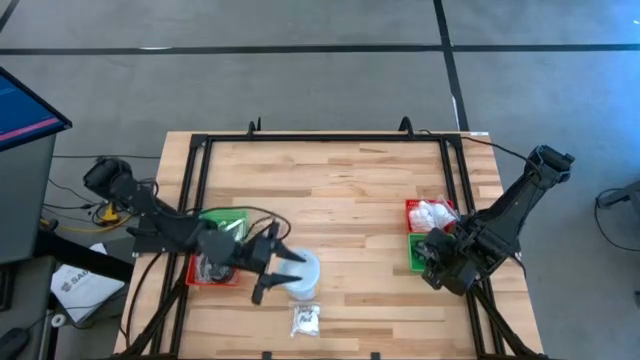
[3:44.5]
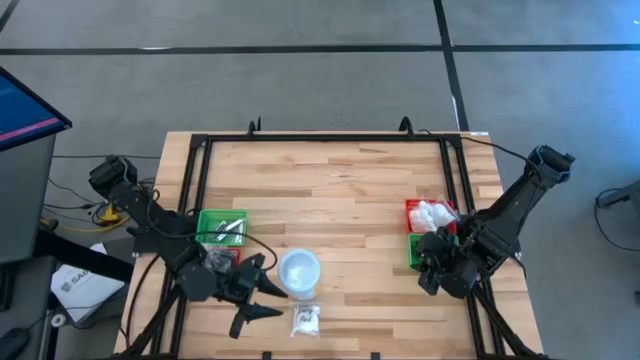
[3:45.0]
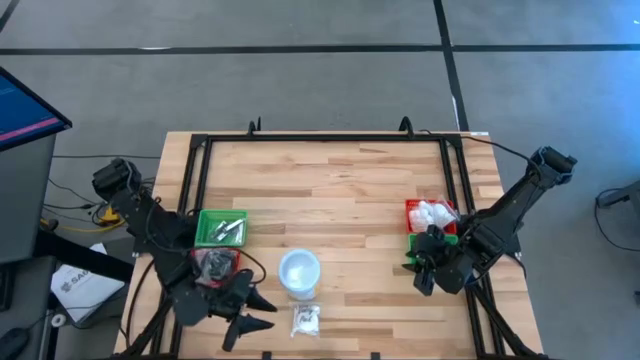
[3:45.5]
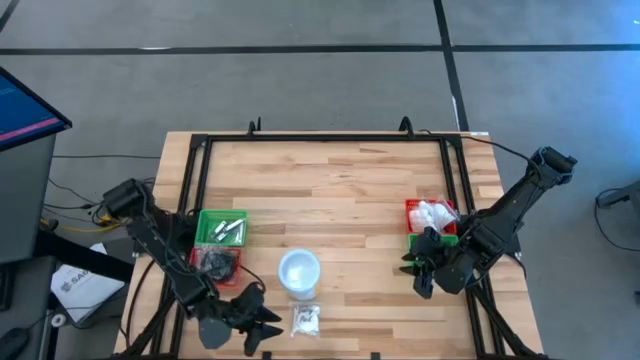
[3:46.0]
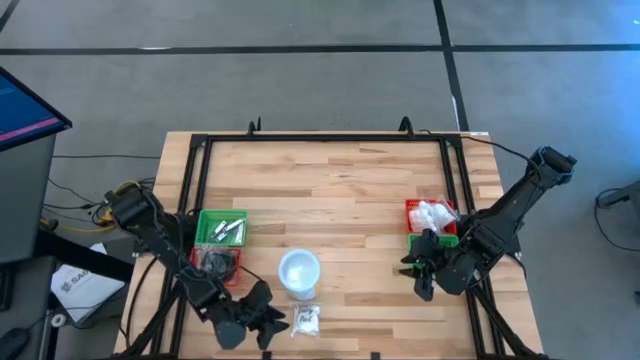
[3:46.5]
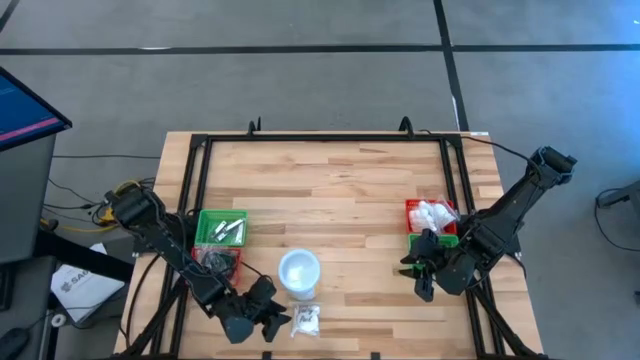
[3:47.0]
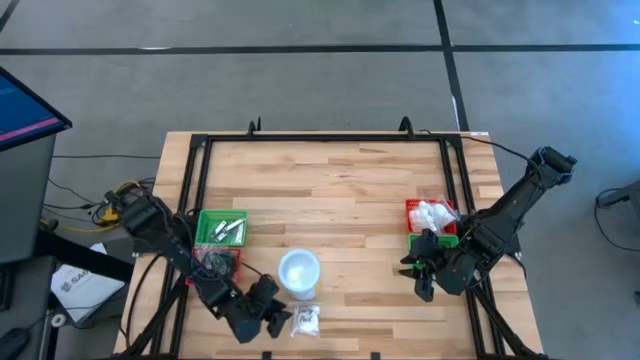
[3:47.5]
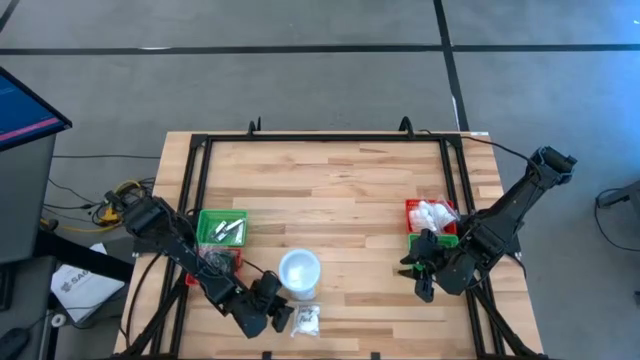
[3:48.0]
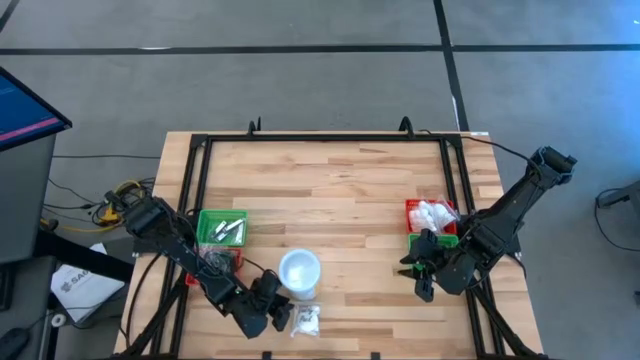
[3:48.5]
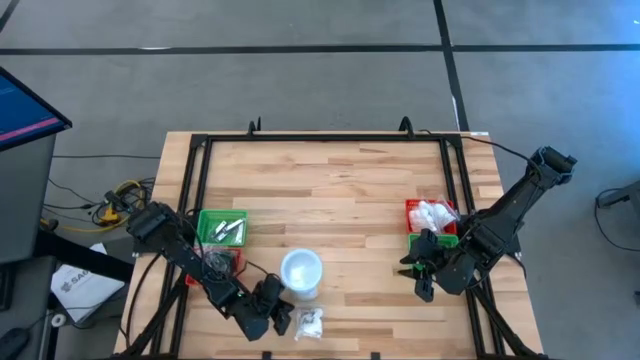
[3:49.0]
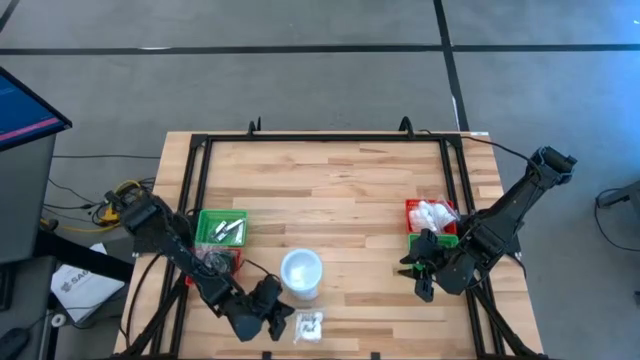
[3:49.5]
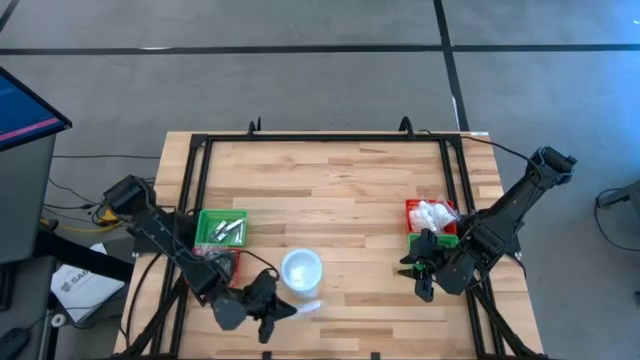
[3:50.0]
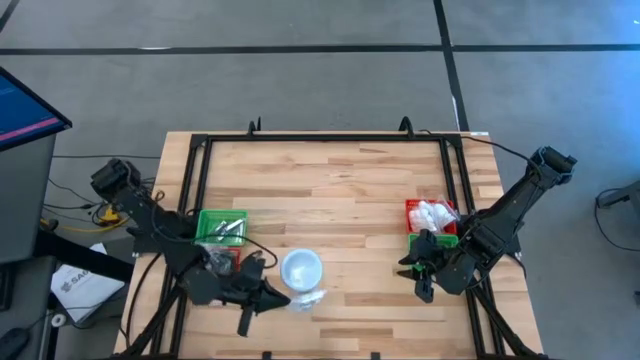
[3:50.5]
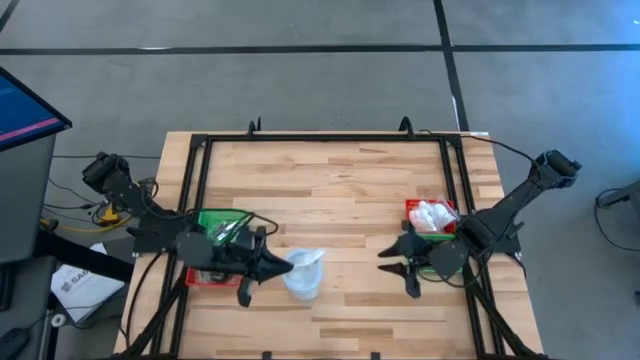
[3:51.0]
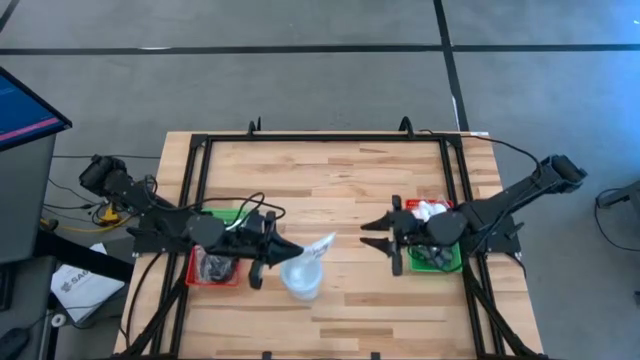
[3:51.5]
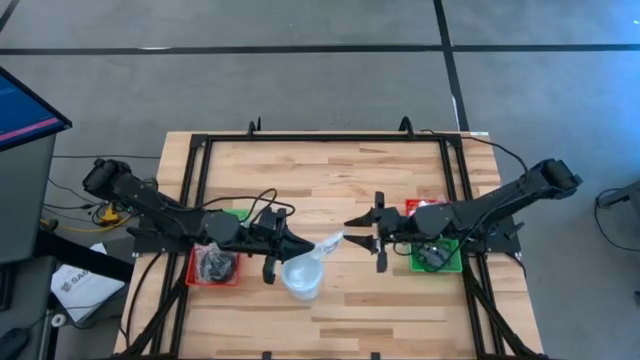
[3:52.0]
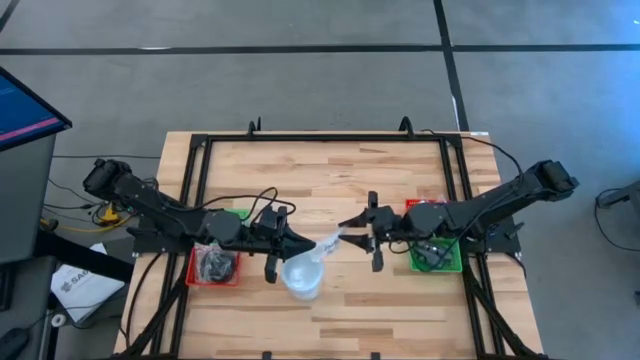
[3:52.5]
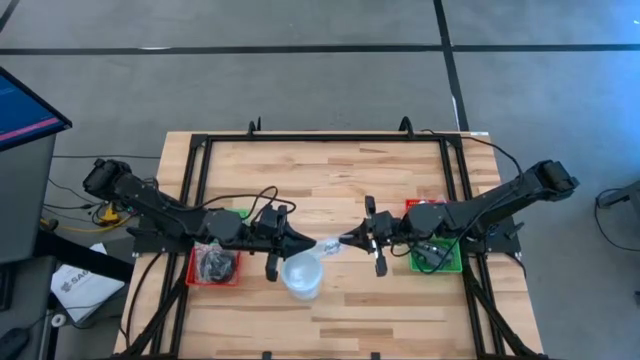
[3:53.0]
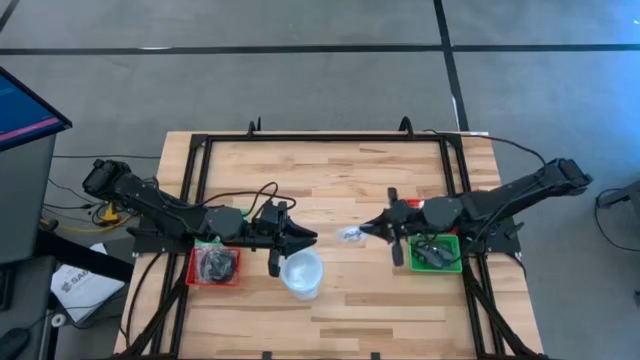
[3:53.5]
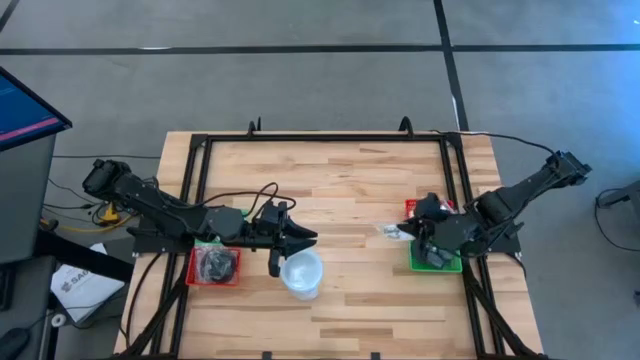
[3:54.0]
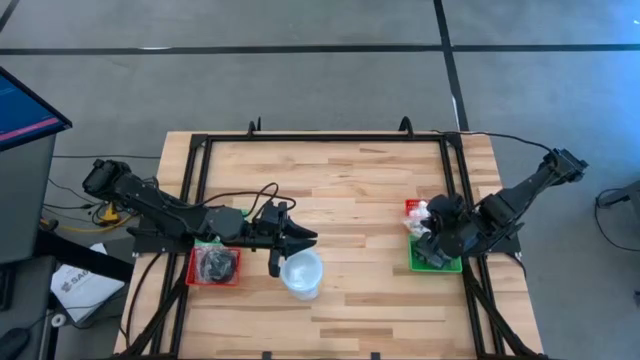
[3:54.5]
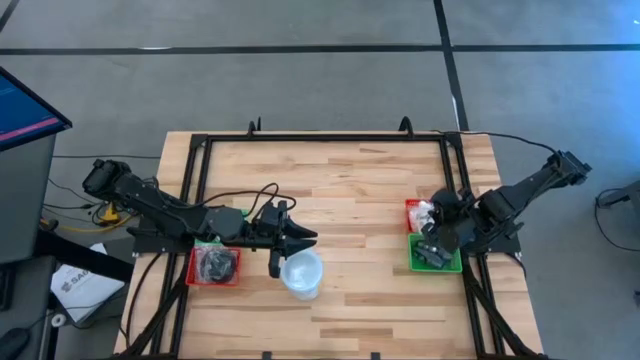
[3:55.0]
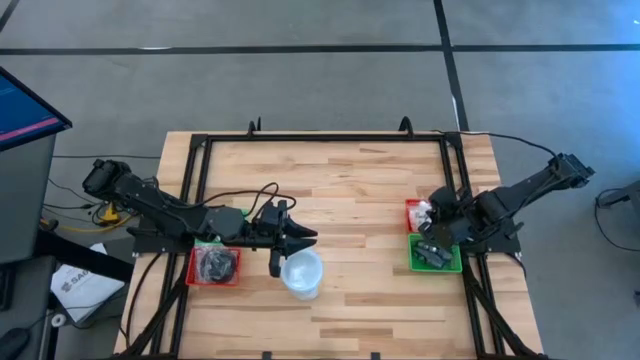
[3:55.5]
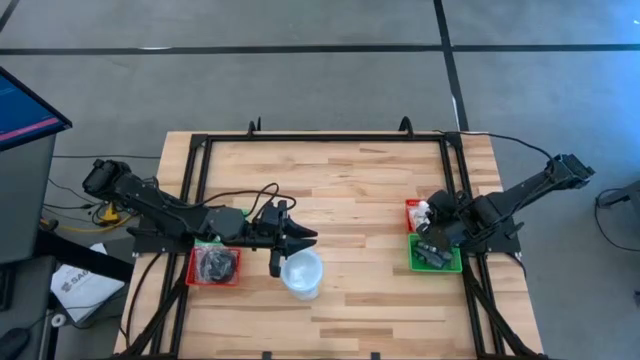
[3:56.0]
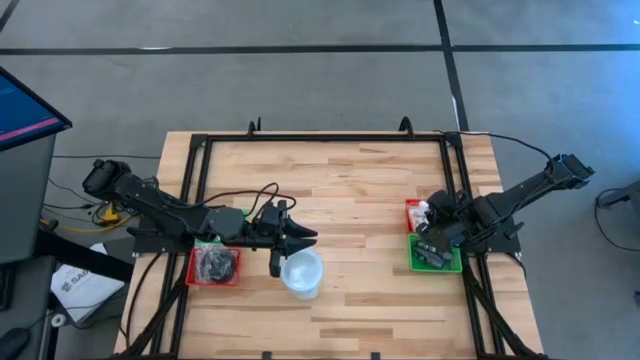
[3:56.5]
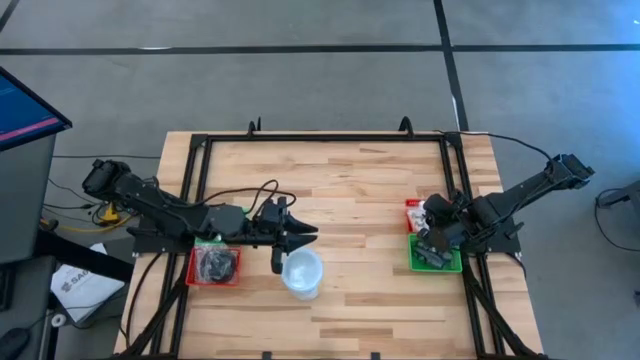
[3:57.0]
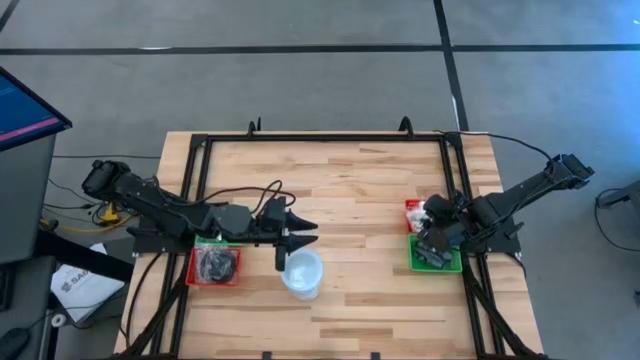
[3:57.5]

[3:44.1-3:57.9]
Task: Pick & Place Travel size toiletries
Put the white vanity pack into the right red bin

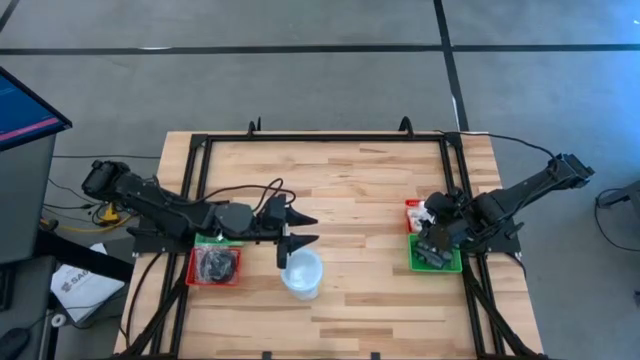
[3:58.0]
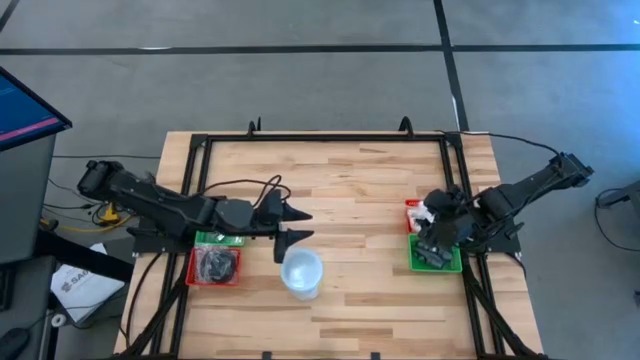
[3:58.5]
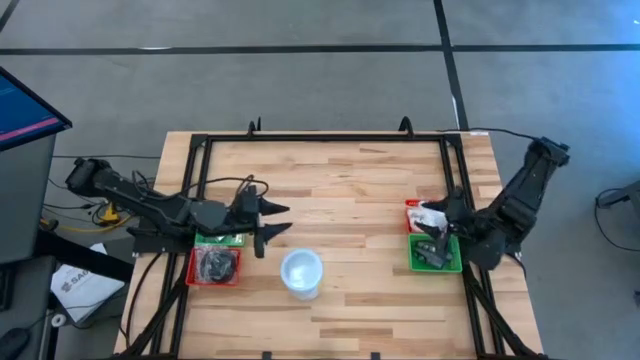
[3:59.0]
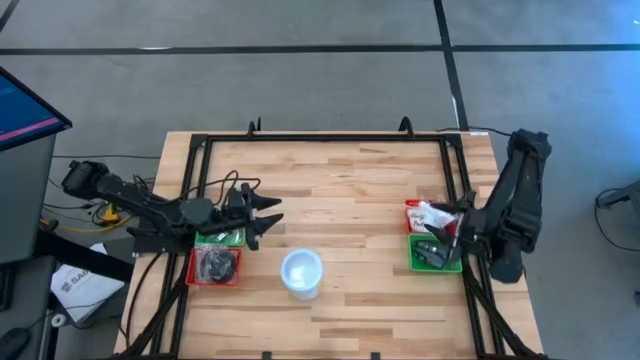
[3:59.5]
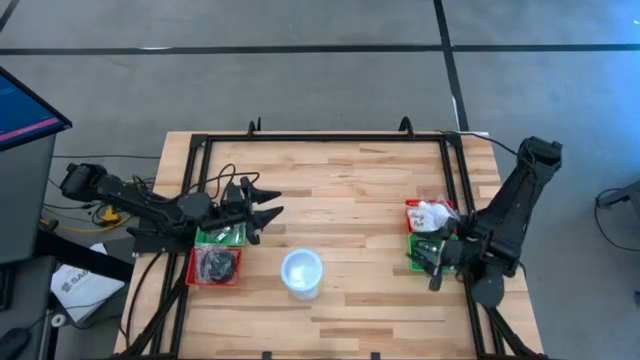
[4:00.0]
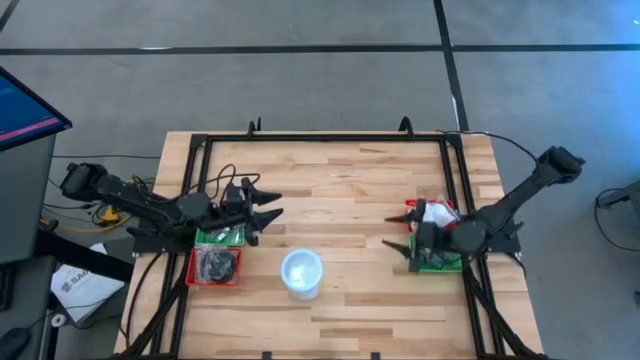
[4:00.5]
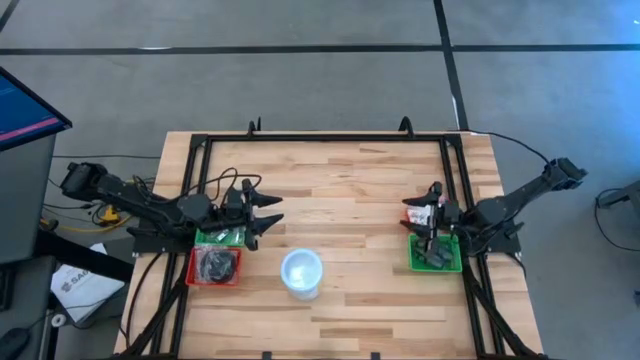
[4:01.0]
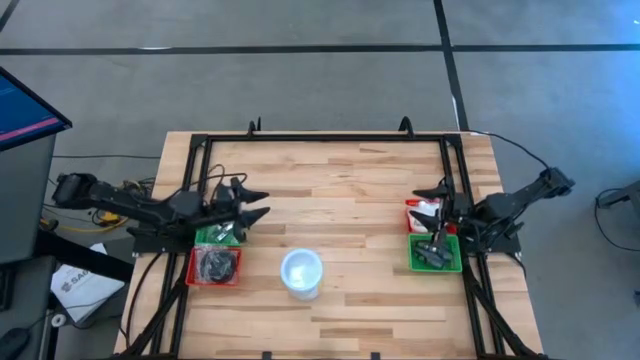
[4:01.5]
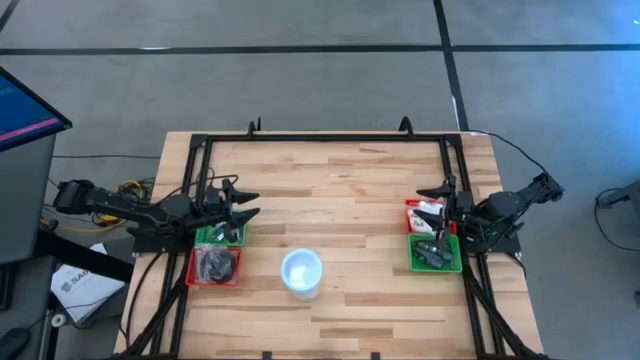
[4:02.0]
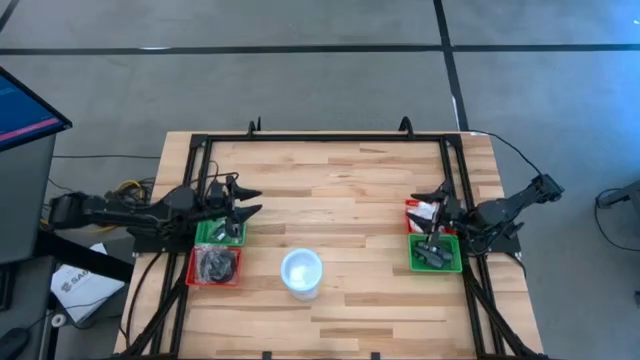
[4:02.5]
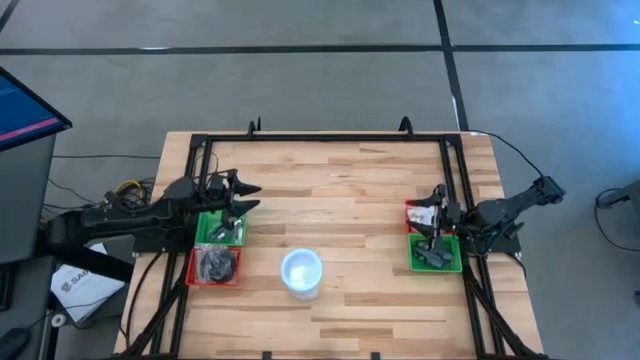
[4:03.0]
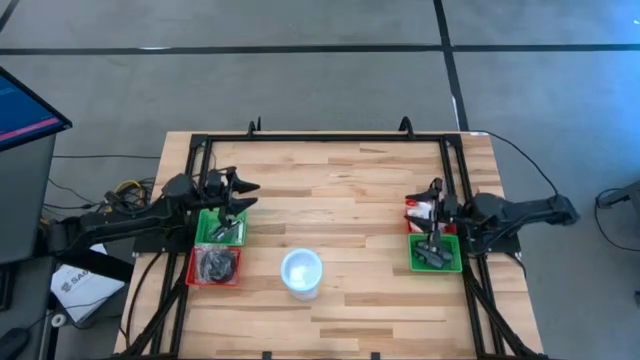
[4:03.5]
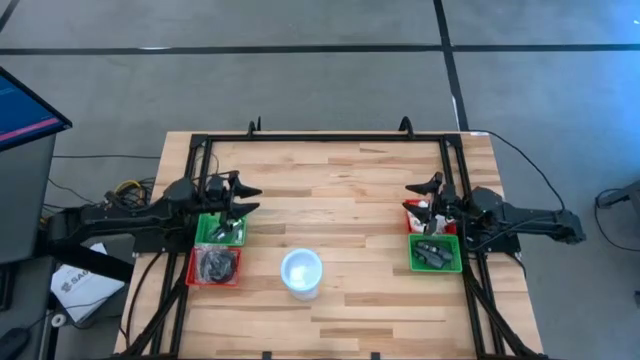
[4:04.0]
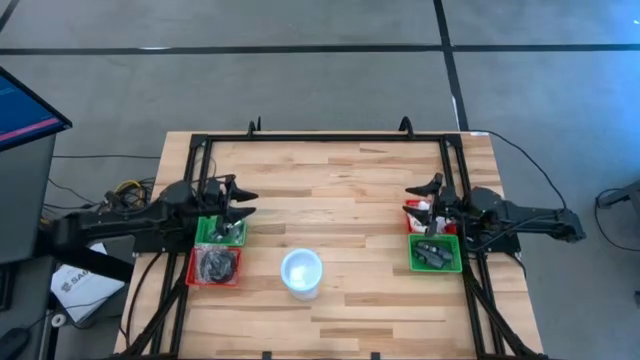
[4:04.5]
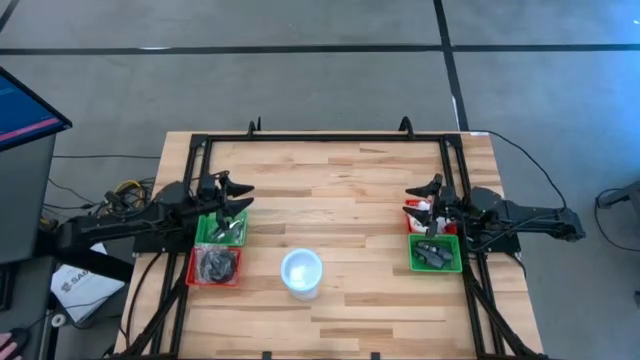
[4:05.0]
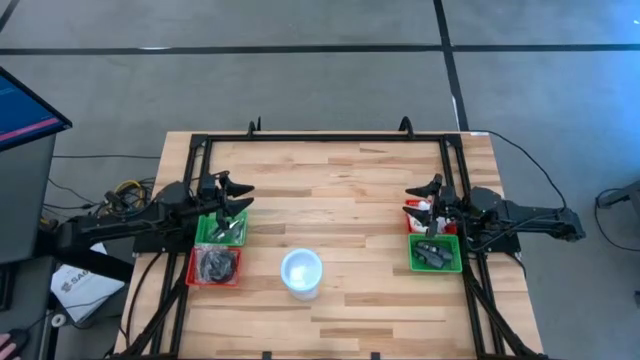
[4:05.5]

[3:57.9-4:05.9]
Return to Home Position

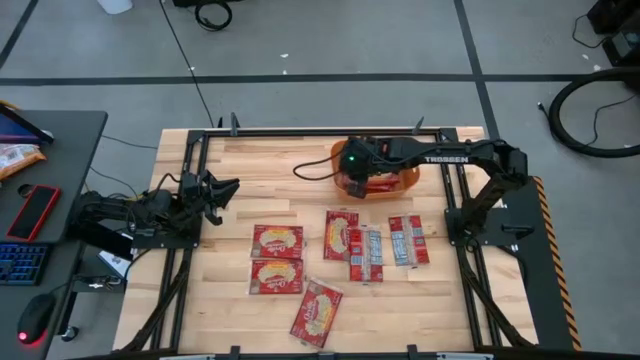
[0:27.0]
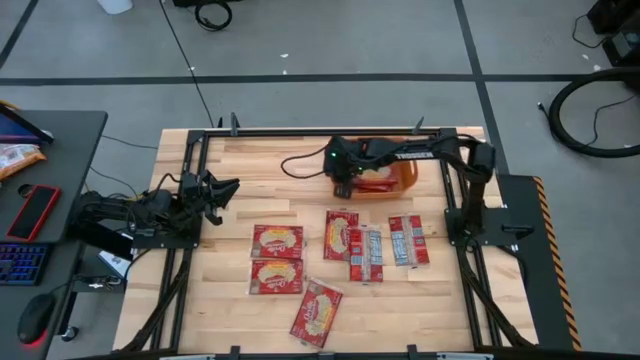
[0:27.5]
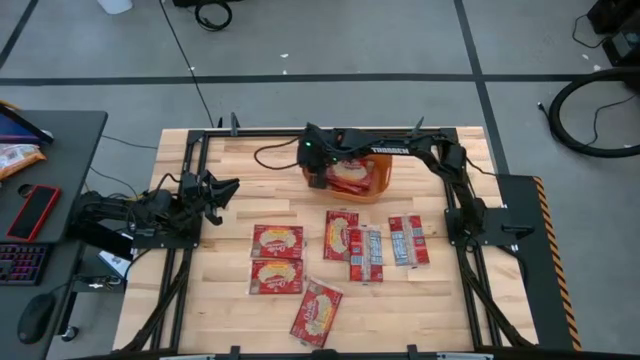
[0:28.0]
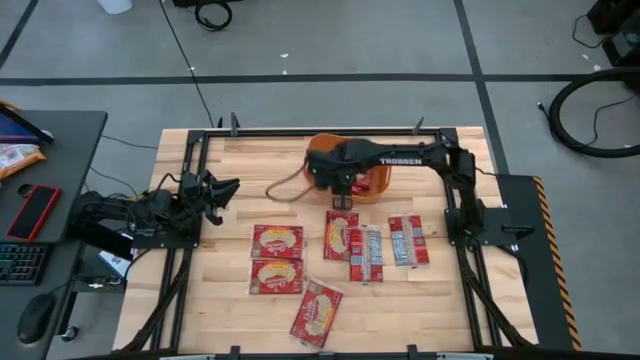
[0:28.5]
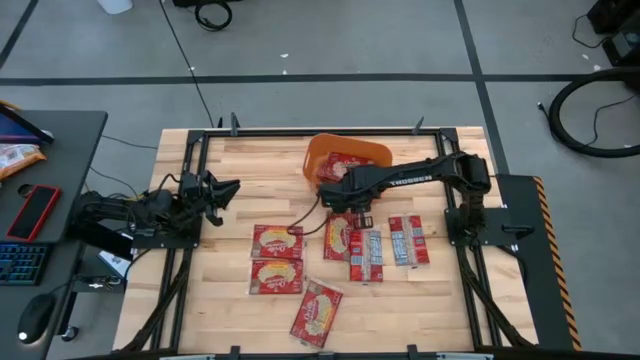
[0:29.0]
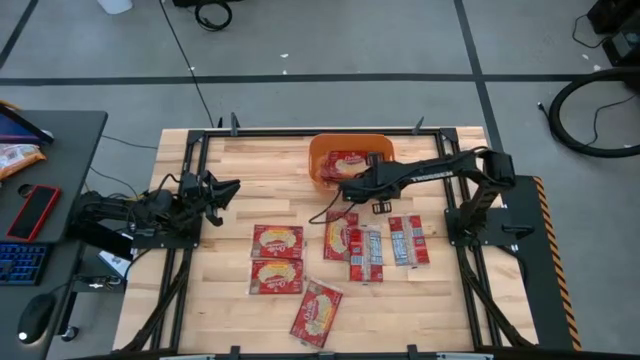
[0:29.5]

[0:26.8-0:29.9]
Task: Sort popcorn bags into baskets
Adjust the orange container
